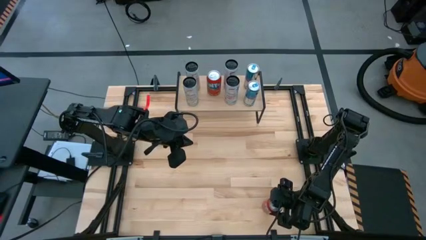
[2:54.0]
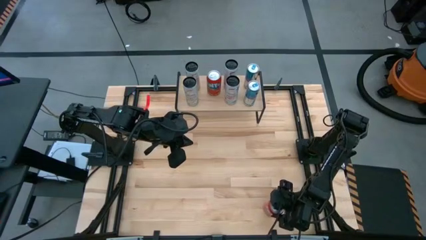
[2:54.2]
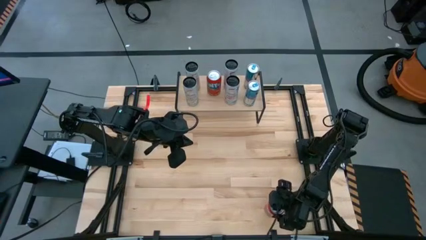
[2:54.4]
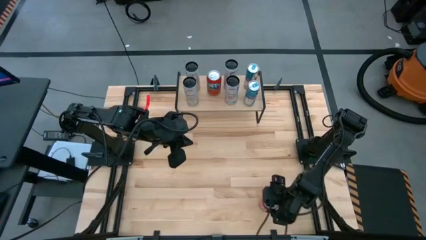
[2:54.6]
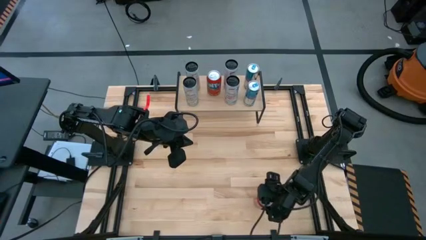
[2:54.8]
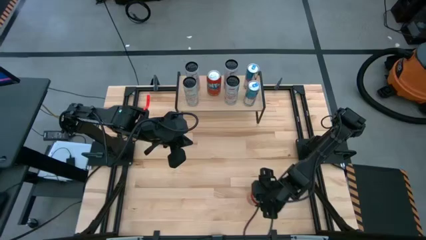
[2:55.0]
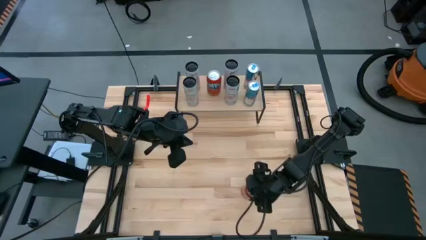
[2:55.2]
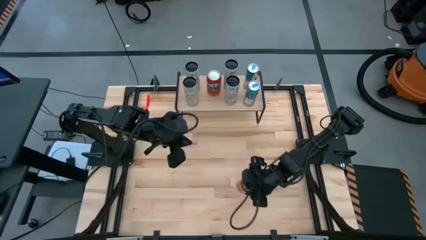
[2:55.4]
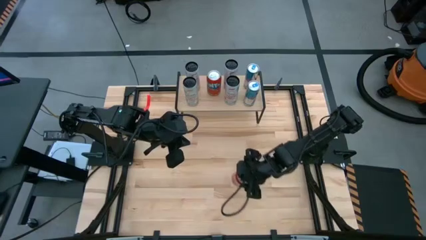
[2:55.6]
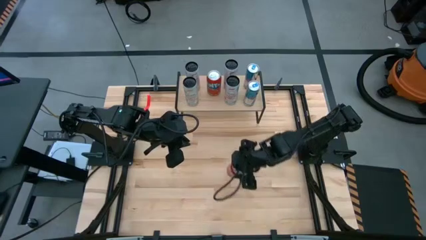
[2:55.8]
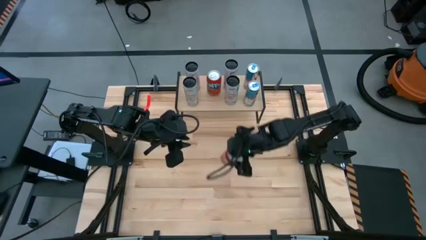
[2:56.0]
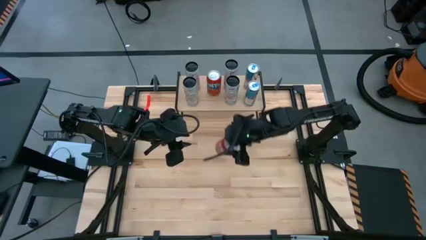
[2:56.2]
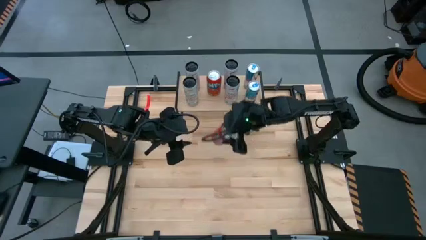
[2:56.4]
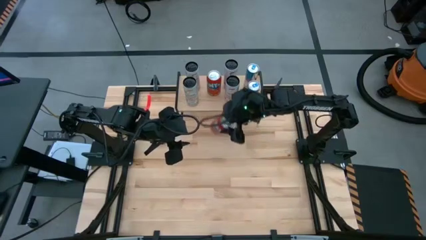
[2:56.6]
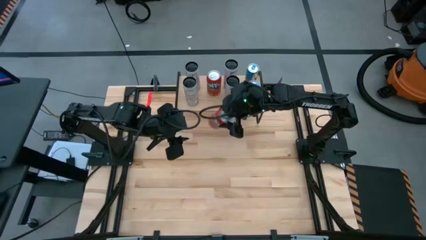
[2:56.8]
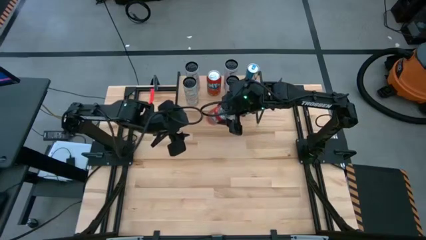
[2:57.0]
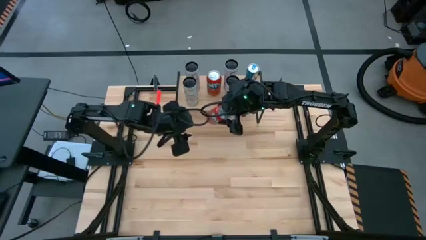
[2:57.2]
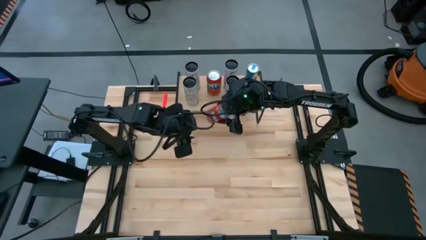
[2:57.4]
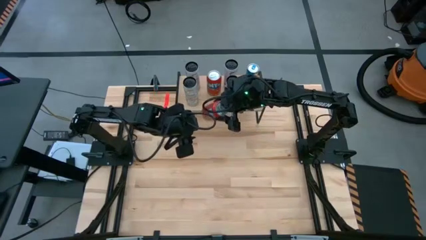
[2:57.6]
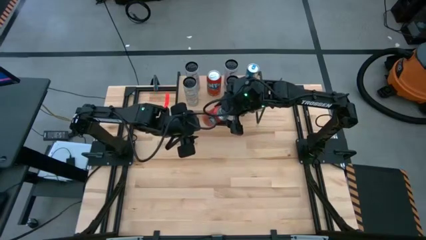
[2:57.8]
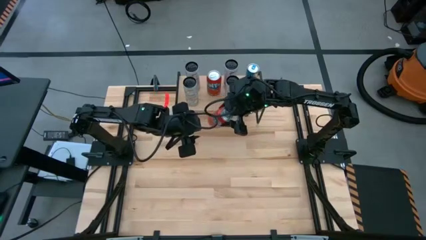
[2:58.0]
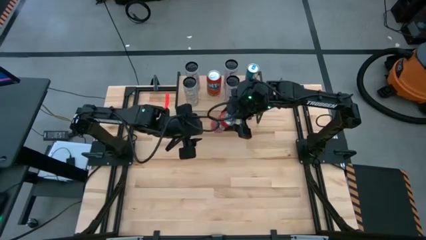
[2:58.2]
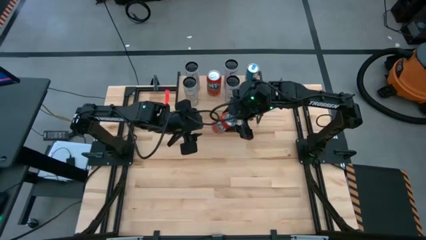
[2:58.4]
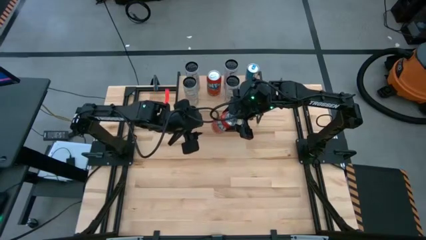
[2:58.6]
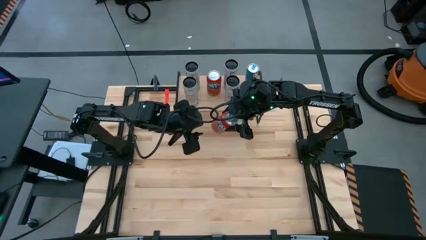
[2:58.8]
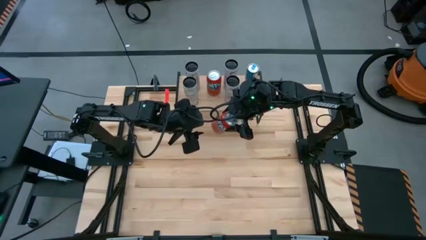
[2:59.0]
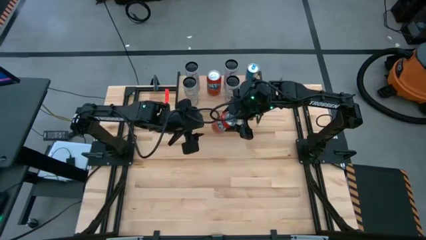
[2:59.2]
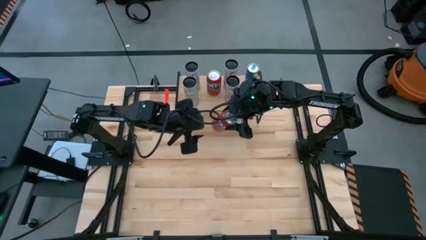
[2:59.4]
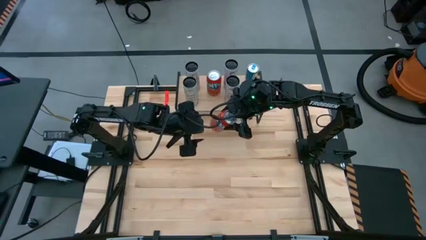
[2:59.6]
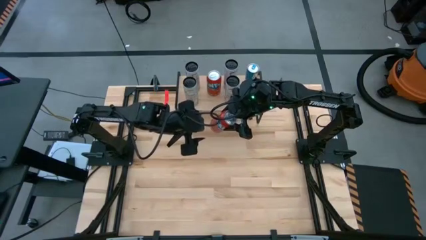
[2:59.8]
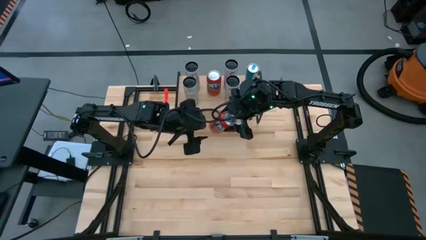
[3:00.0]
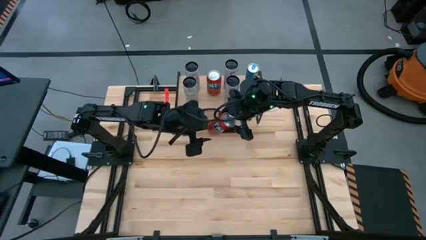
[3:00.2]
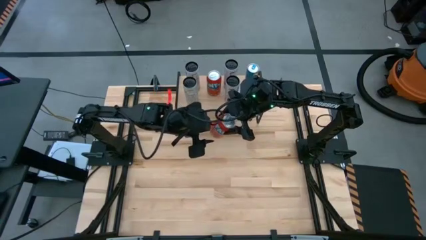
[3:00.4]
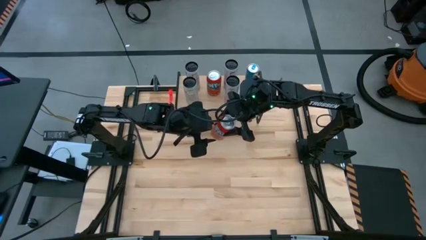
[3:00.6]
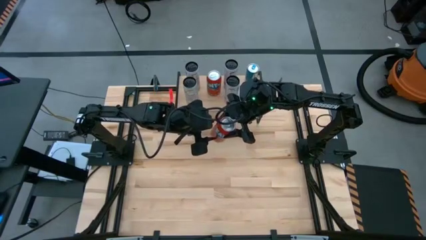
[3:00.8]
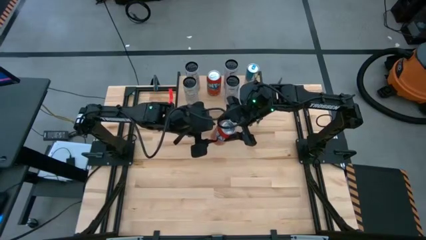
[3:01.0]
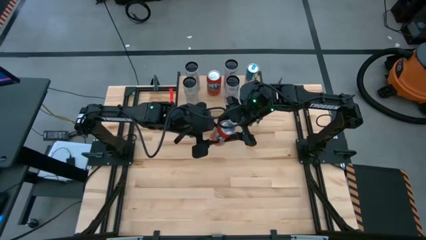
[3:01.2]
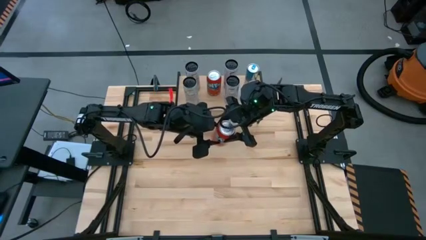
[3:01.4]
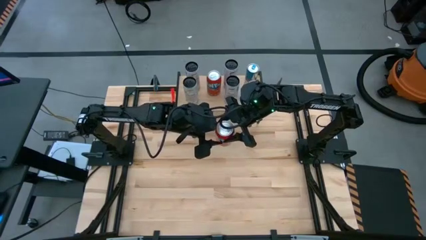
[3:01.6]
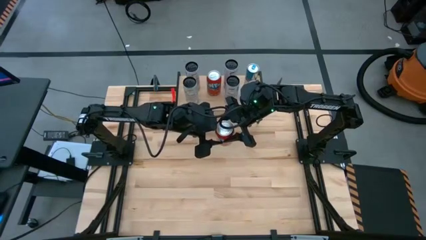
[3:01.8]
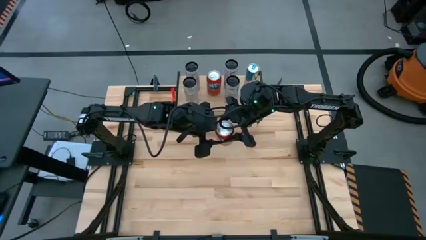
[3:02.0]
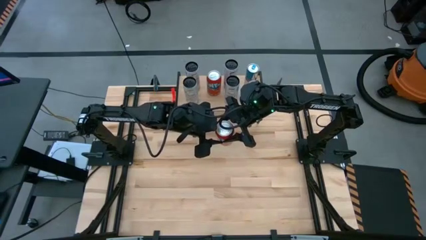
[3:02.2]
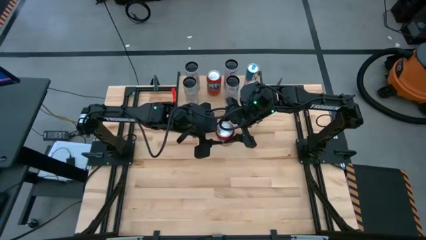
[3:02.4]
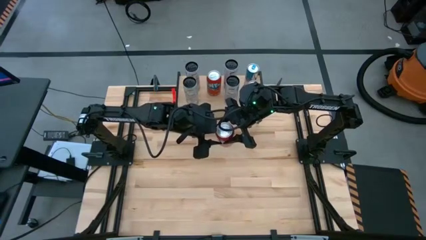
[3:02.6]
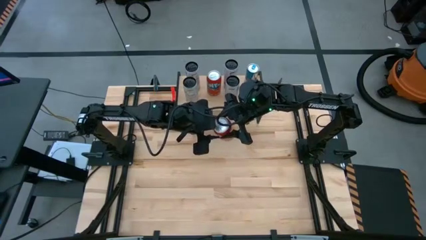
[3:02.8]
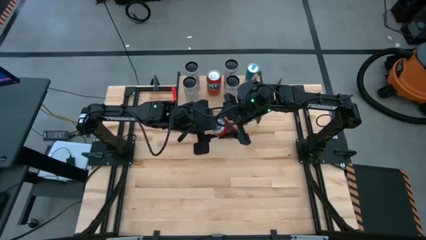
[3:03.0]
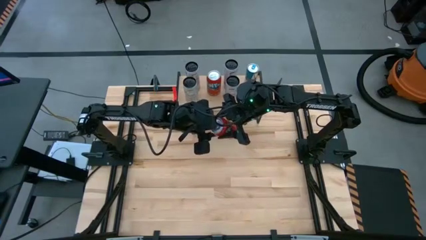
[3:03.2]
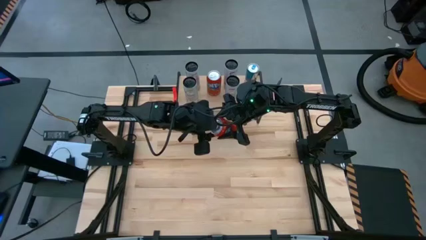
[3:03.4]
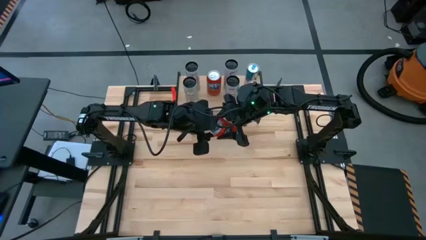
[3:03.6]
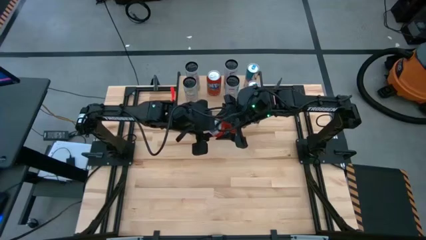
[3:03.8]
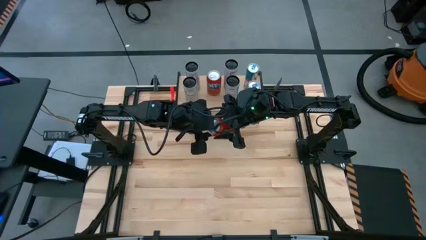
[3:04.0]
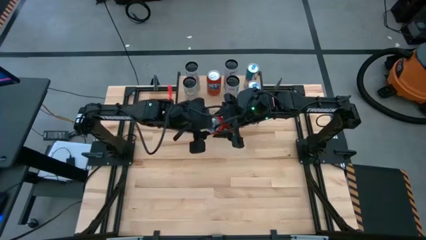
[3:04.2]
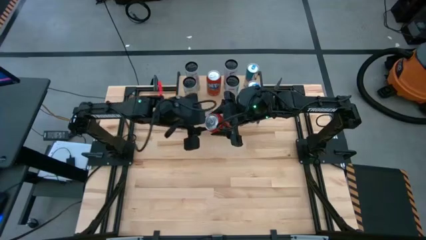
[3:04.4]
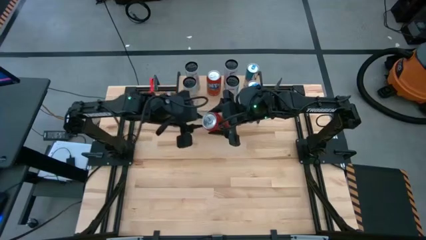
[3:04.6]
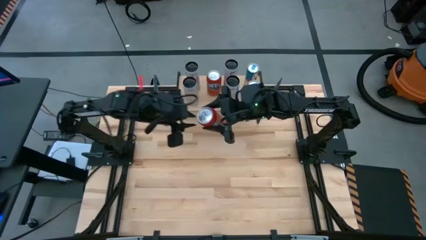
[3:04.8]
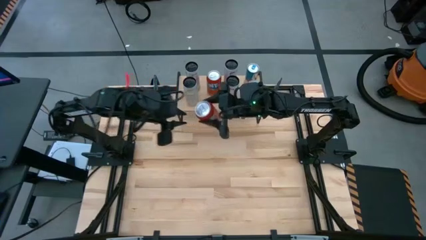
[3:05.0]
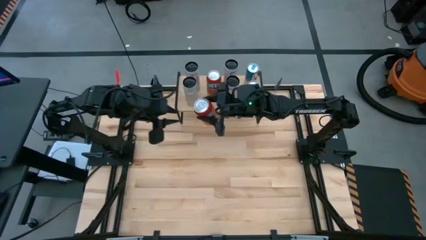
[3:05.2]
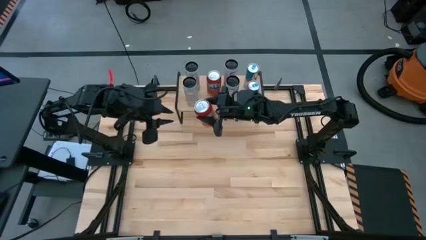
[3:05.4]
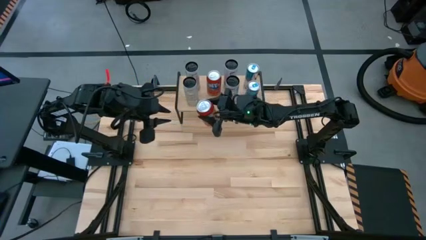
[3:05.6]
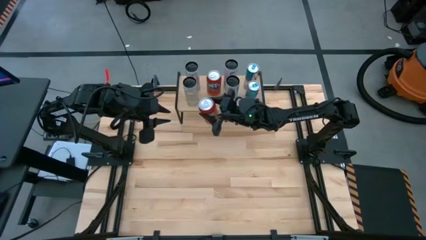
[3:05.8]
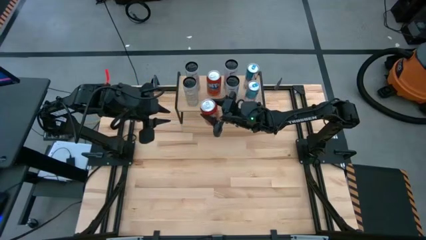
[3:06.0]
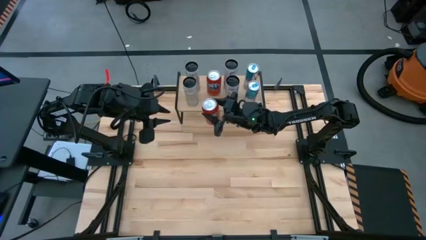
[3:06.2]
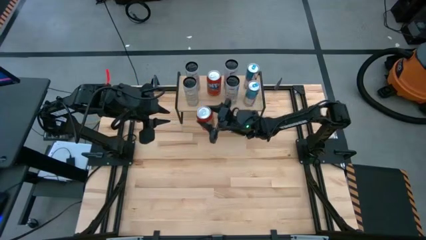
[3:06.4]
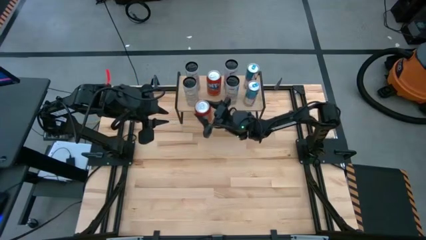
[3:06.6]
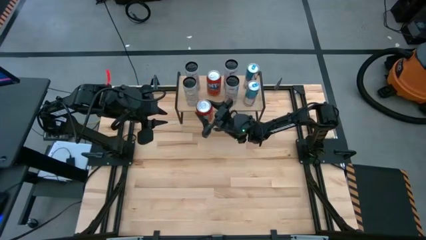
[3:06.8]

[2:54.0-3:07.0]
Task: Place canned beverage on shelf
Put the red soda can on the shelf aligned with the other red soda can

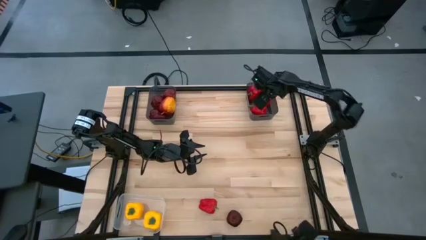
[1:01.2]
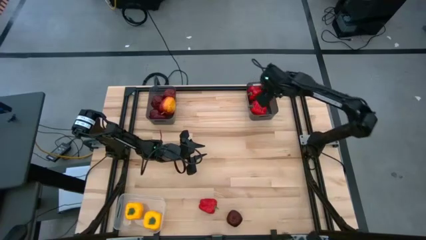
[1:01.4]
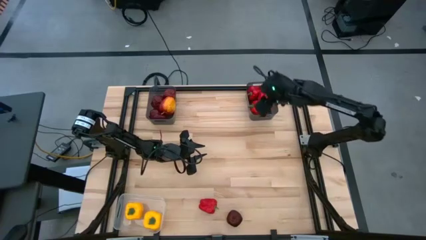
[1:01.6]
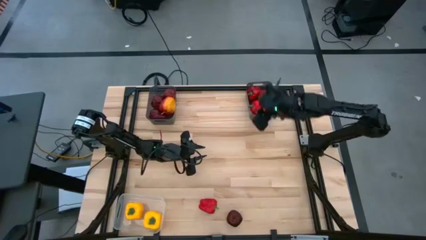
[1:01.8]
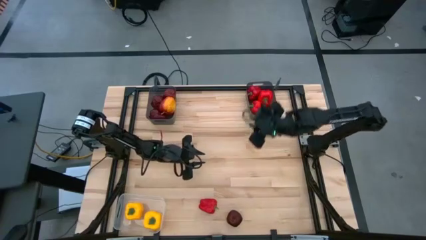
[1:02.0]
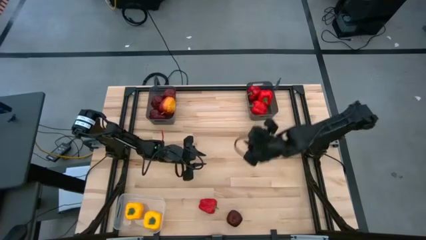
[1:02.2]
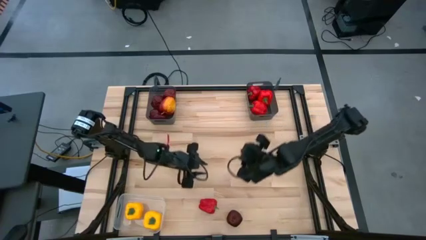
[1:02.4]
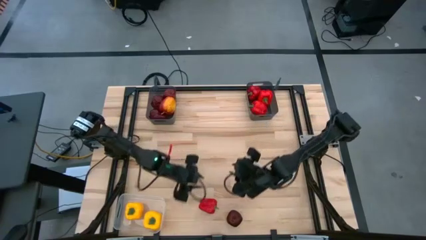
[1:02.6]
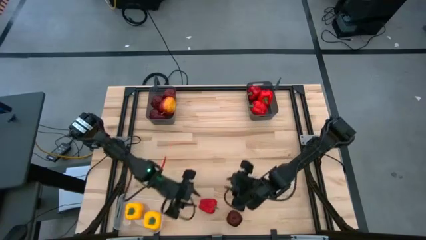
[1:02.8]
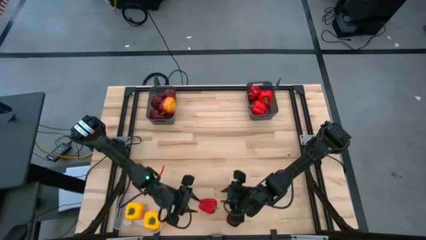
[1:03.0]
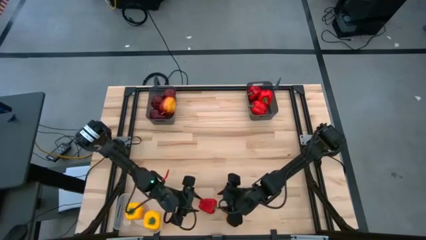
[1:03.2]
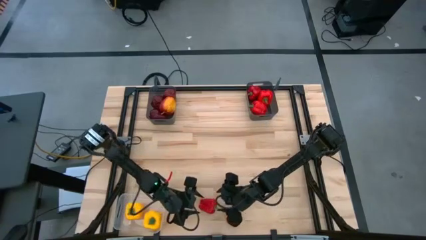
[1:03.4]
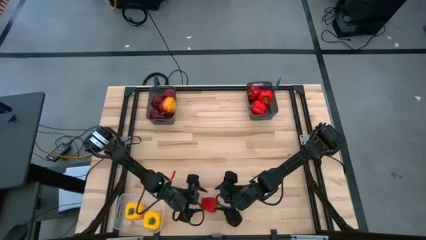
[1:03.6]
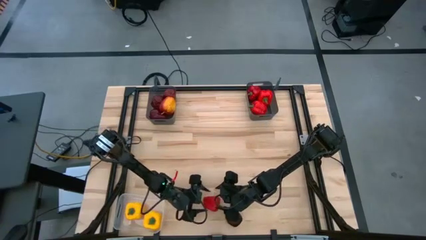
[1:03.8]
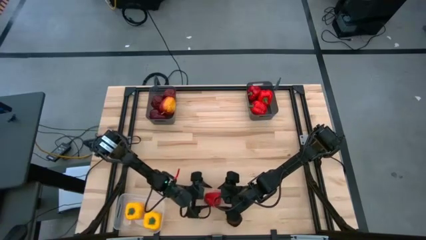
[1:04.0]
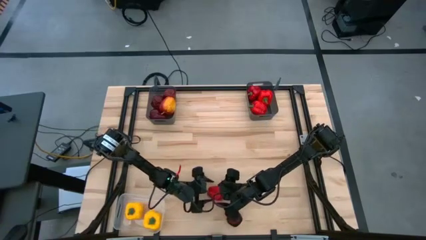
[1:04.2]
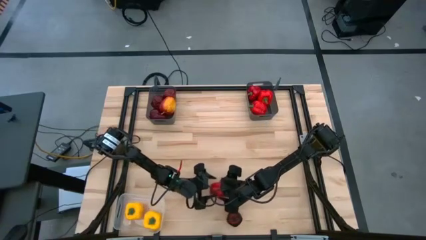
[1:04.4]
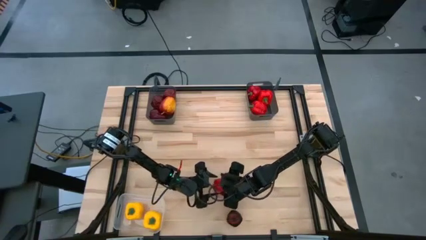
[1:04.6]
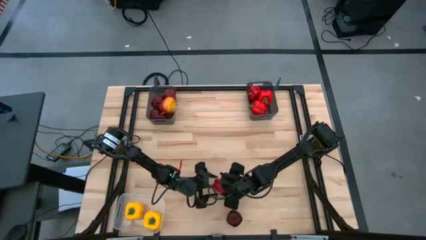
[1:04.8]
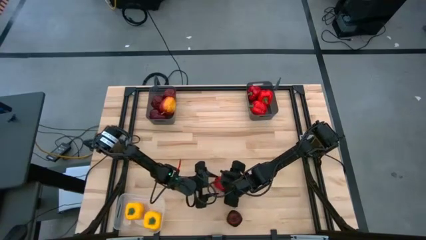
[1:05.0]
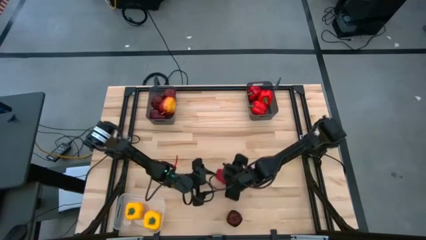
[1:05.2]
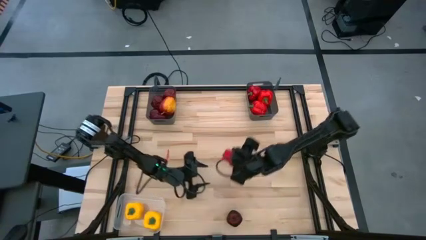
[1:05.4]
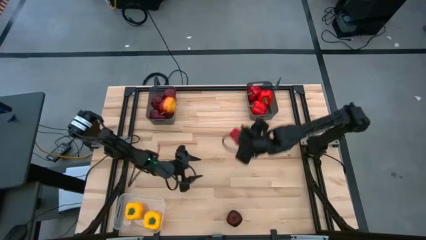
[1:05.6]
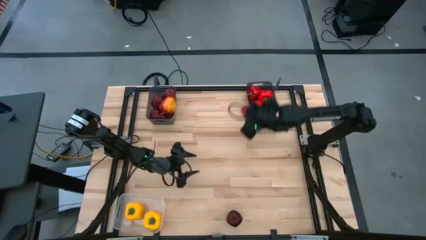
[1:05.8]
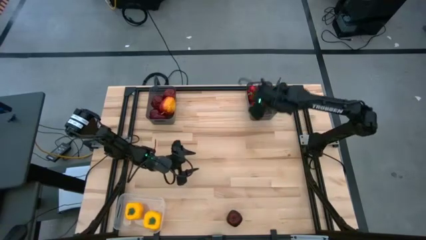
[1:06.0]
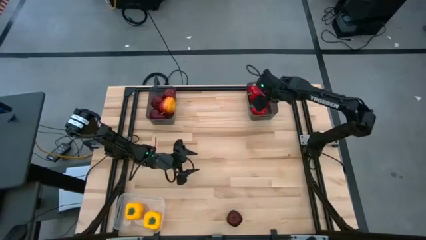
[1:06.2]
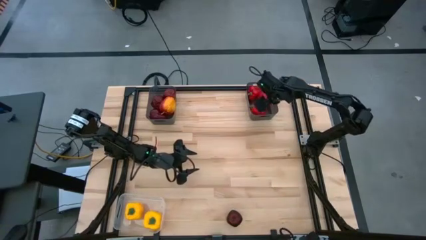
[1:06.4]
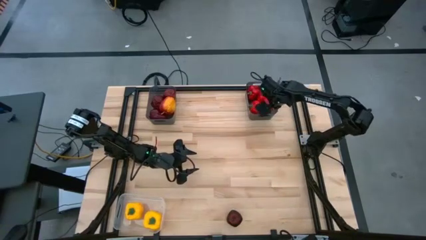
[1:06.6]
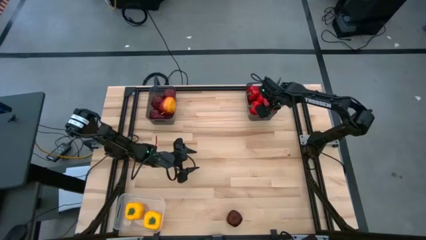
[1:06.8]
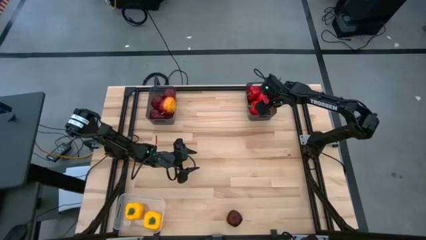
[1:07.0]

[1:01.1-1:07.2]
Task: Sort produce into baskets
Put the red bell pepper into the right black bin
